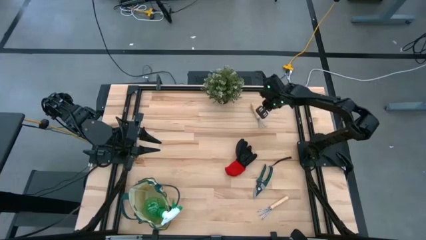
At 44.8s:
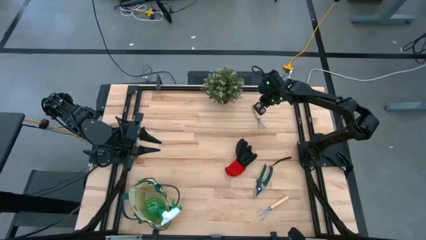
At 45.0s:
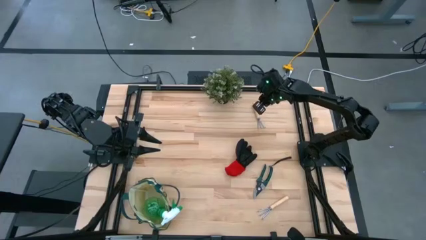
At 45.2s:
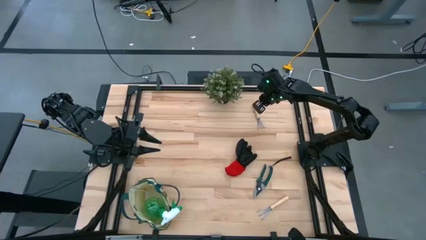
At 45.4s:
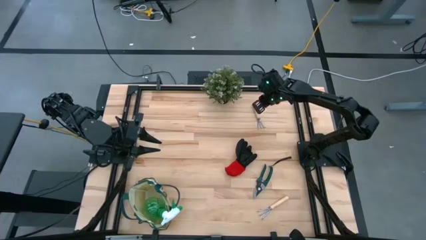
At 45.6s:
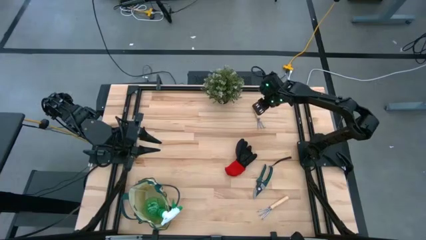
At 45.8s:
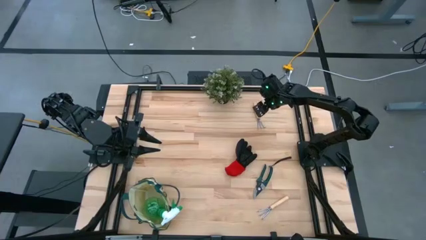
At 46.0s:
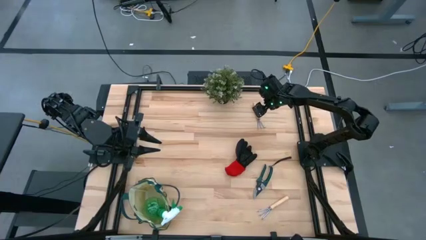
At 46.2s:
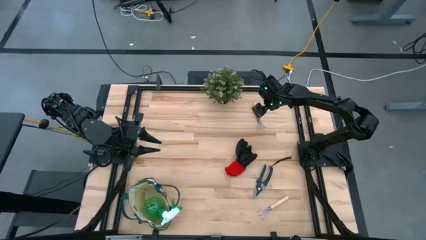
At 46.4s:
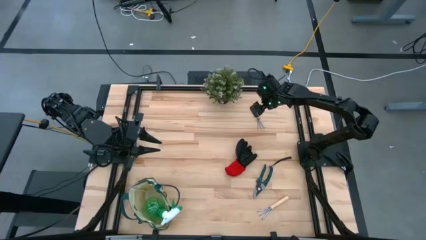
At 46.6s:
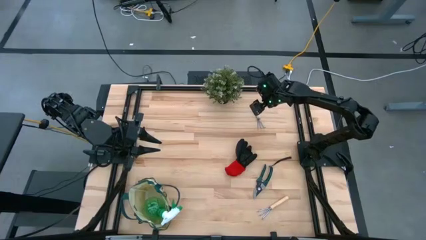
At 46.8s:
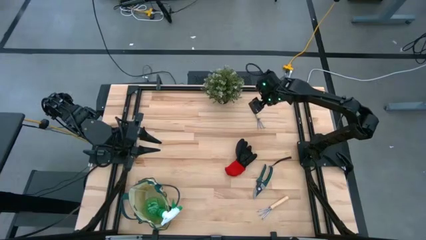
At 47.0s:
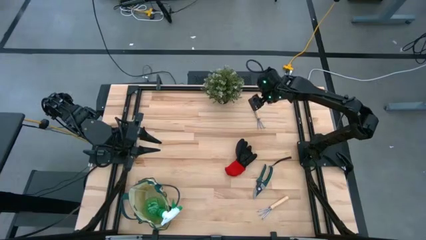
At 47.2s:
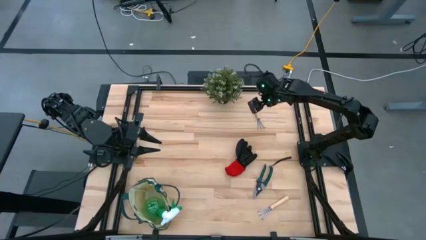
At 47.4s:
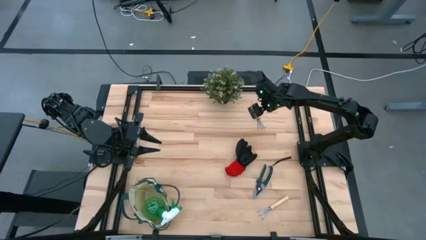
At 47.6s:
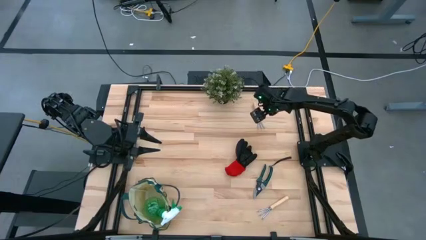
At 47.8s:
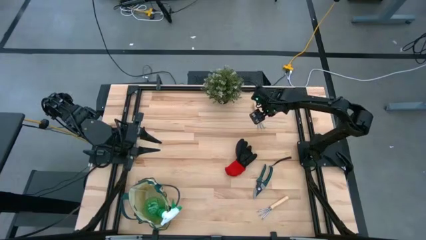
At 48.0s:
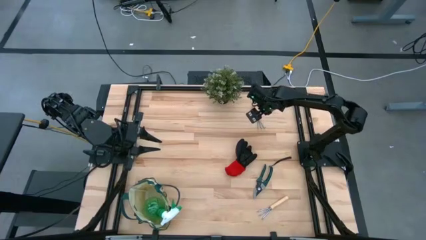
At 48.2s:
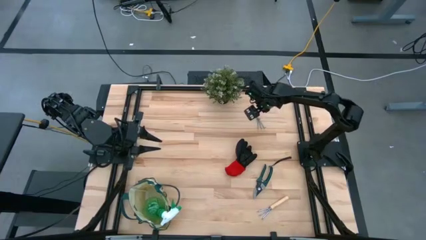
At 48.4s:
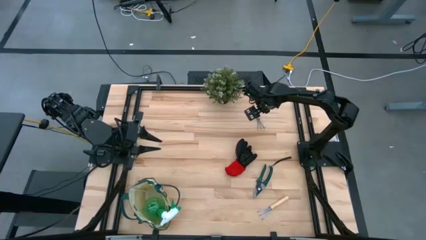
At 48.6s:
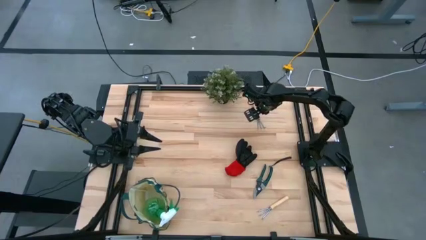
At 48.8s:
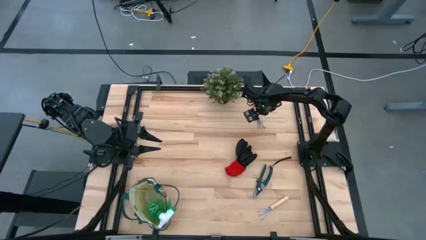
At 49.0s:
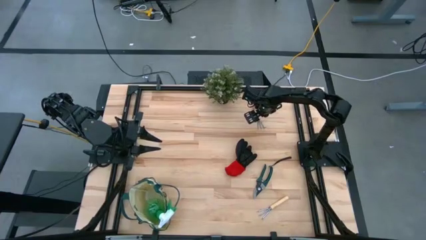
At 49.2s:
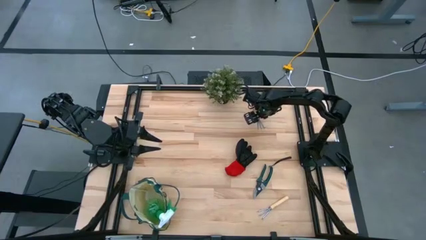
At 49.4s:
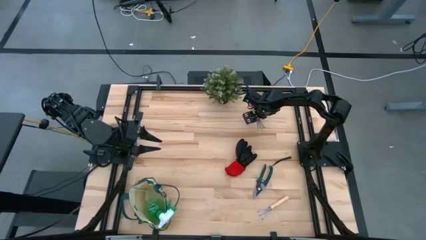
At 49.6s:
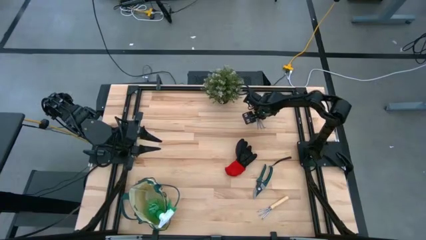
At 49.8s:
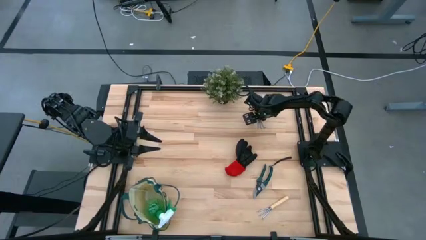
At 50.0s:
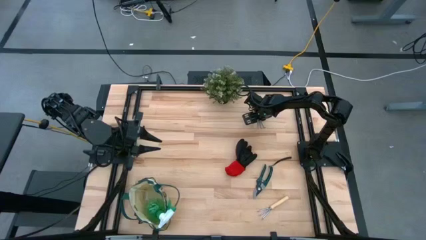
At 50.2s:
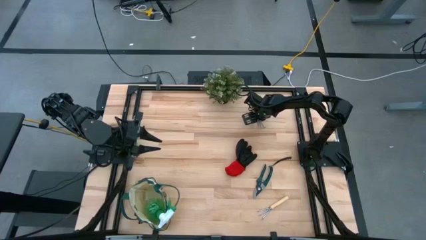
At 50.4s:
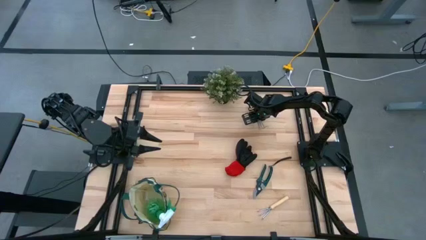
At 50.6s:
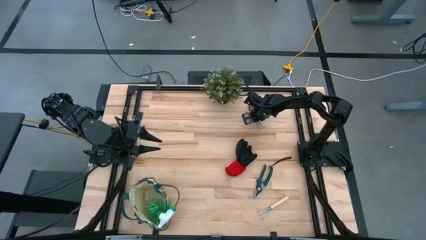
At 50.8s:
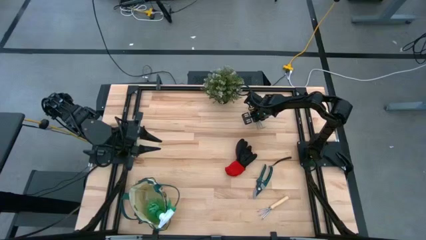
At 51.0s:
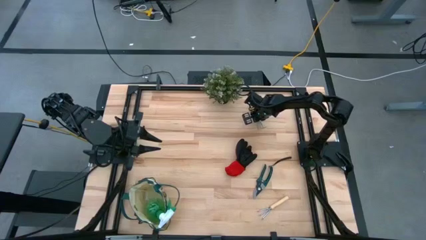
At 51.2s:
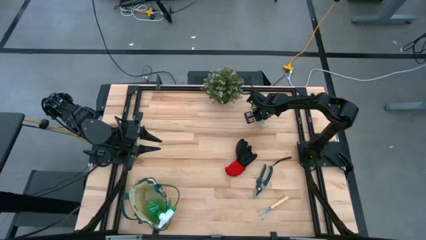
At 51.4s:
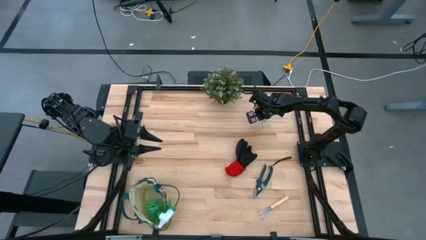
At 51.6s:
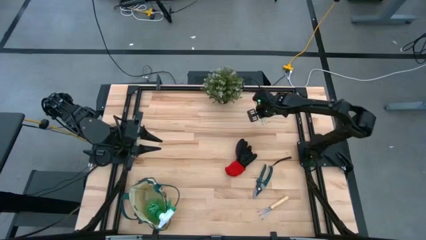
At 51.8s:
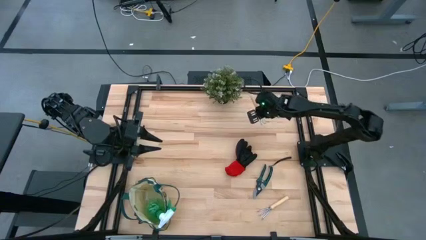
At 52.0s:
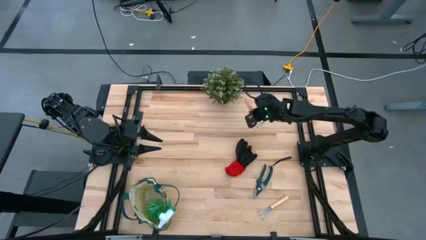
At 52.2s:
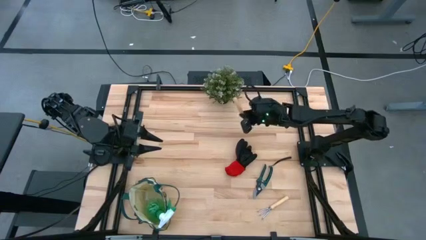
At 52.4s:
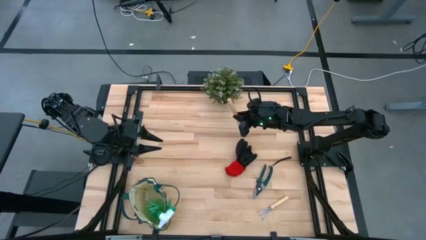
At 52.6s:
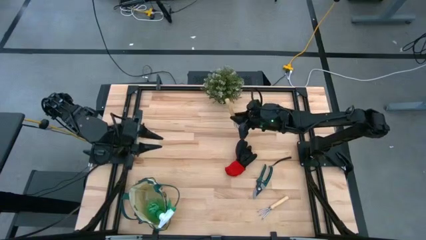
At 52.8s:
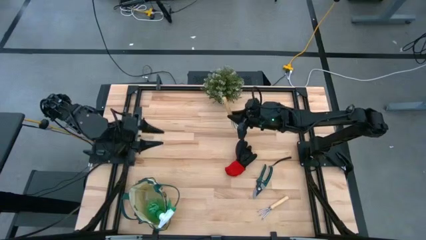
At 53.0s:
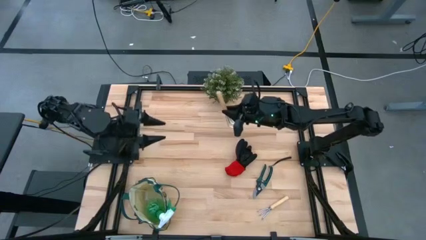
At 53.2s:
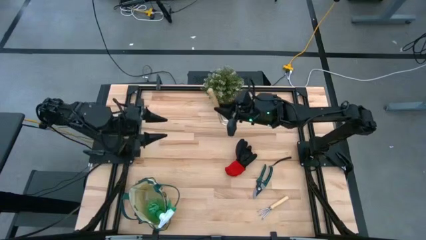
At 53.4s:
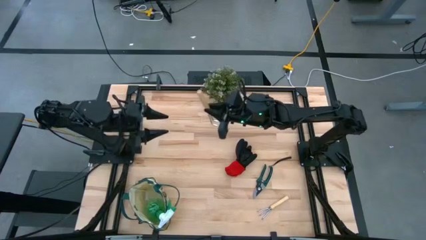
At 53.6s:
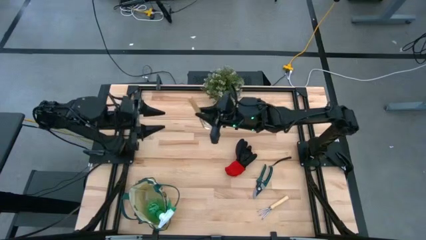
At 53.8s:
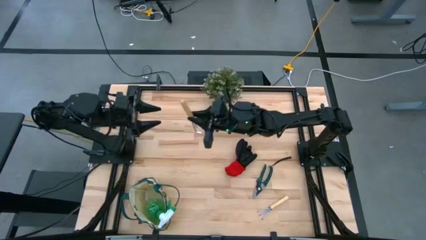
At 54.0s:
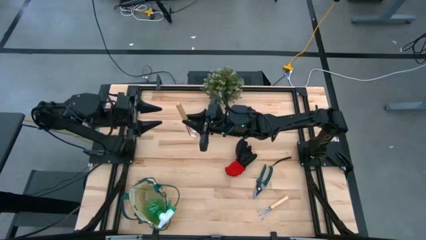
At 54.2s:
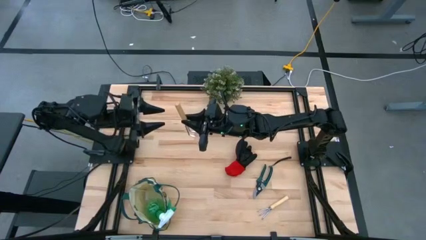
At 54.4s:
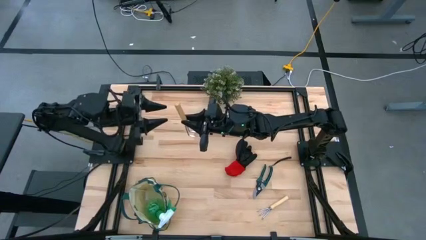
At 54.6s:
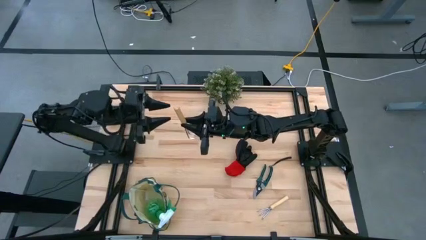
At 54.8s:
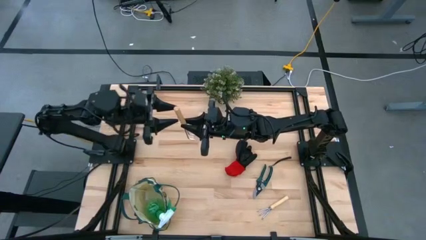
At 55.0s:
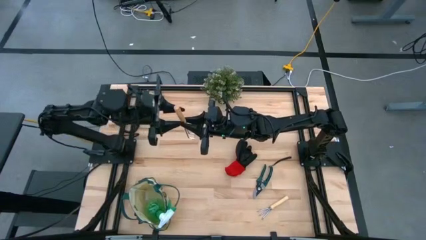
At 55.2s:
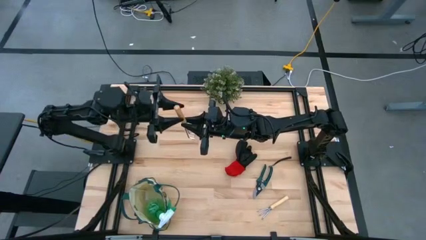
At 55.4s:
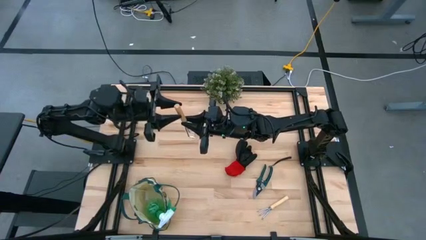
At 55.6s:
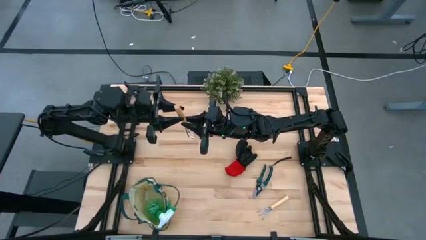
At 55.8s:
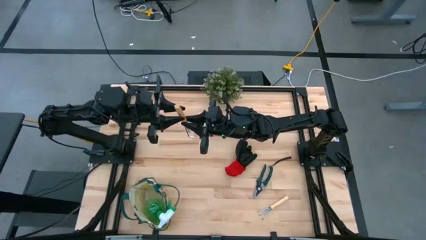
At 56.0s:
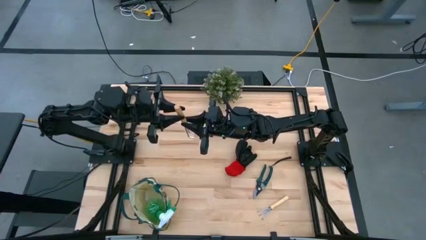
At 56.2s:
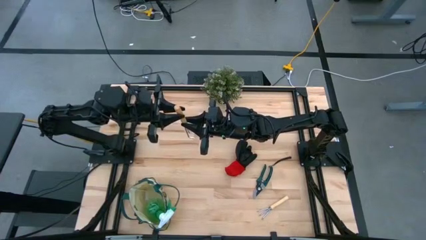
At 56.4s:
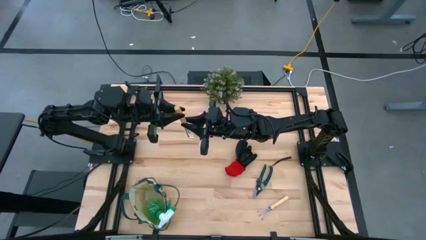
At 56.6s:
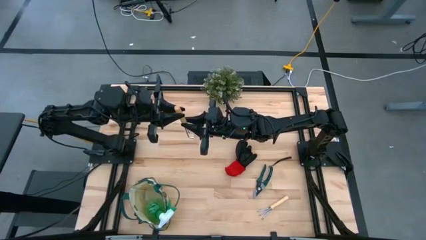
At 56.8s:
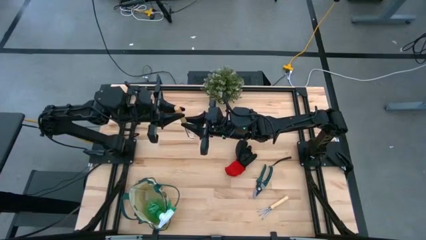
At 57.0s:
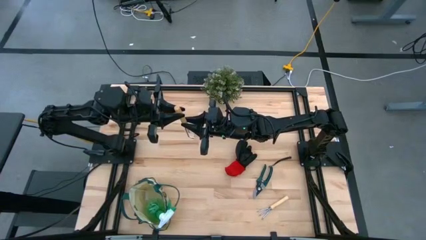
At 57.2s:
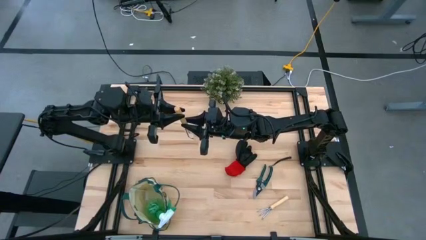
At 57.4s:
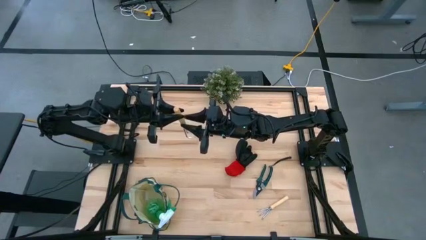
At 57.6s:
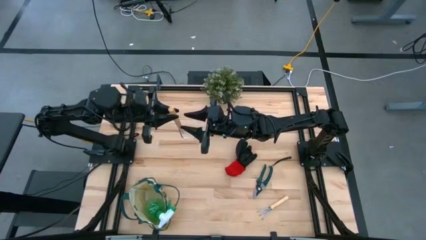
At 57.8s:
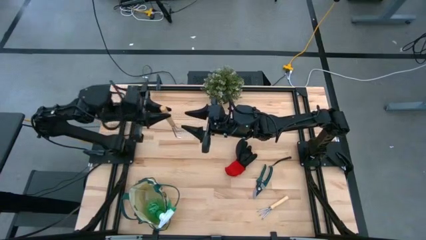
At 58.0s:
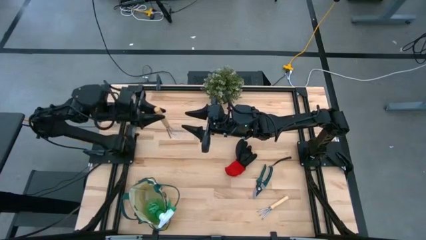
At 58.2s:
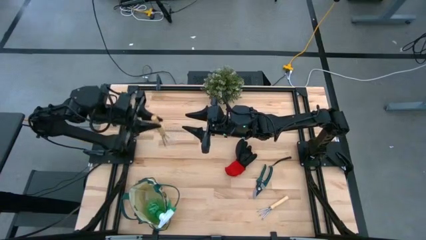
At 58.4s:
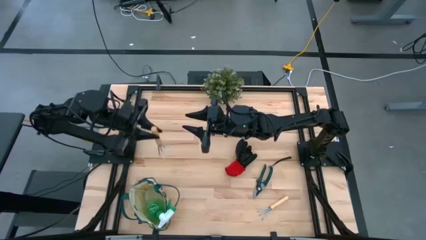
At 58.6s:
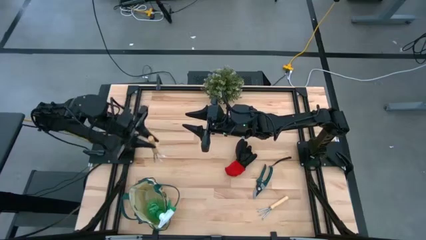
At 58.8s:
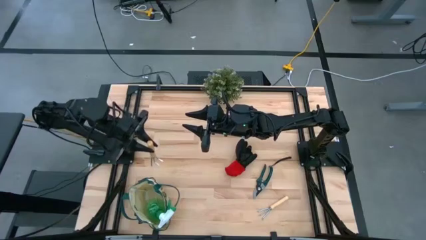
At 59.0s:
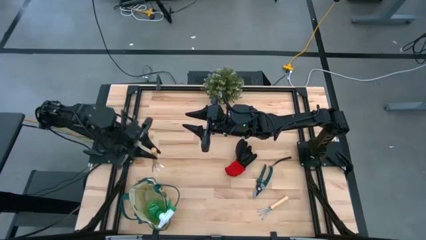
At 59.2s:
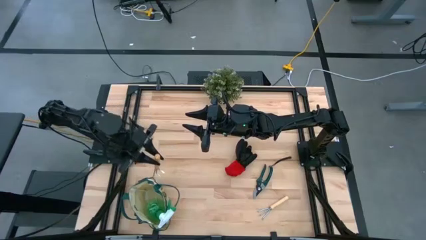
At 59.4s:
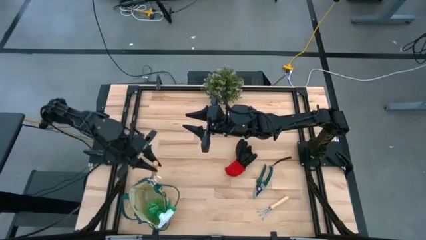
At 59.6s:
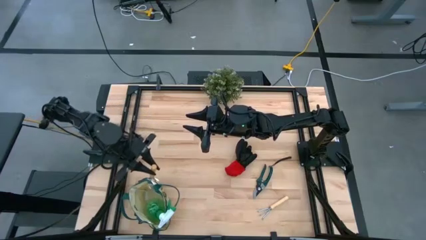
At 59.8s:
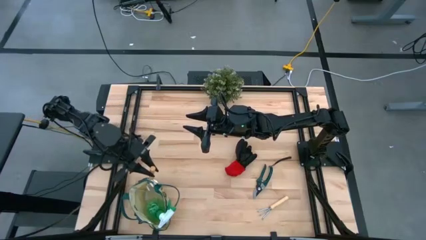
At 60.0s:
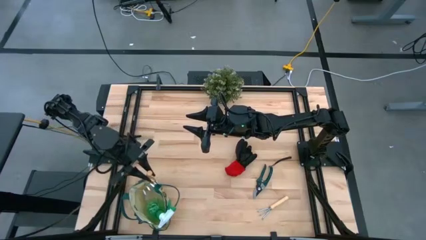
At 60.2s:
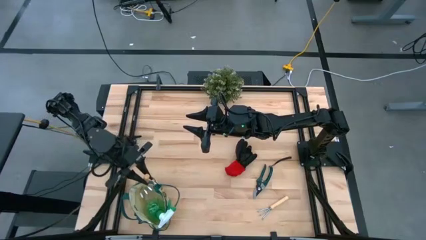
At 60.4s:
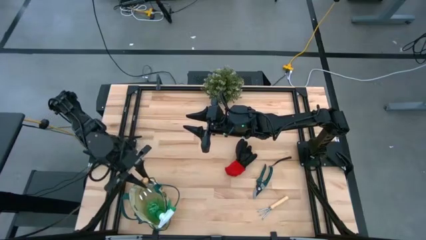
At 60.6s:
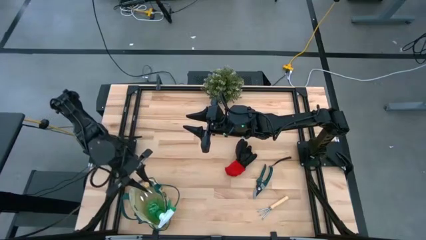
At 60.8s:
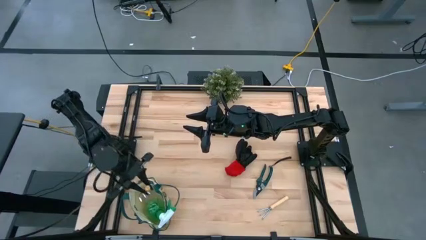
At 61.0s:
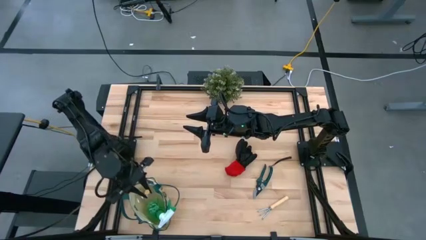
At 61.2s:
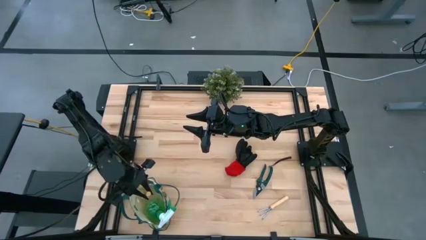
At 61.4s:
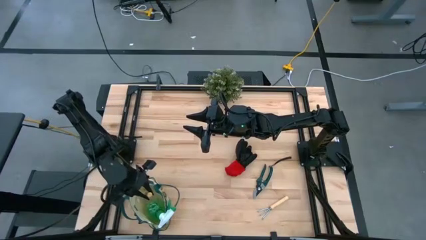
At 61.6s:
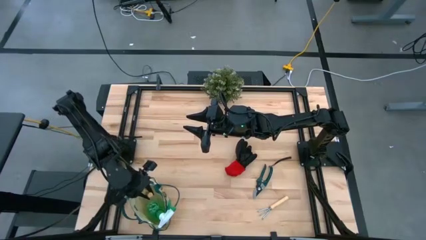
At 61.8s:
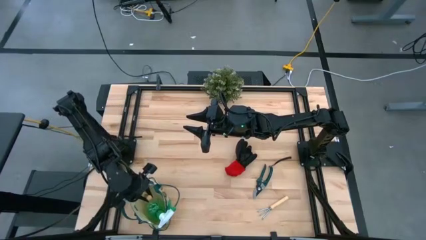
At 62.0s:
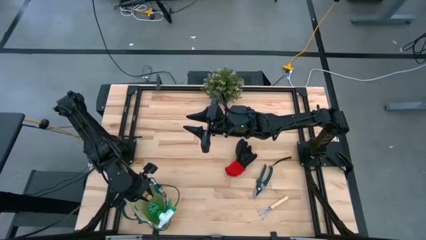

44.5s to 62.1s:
Task: Pick & Place Garden tools in Gardening bag
Put the brown hand rake into the gardening bag
